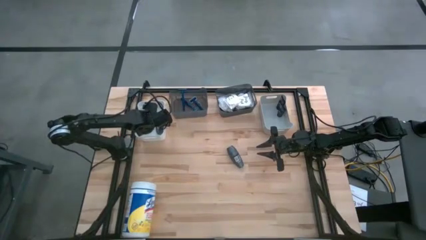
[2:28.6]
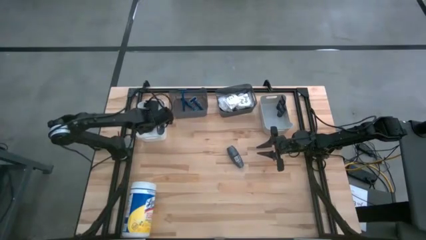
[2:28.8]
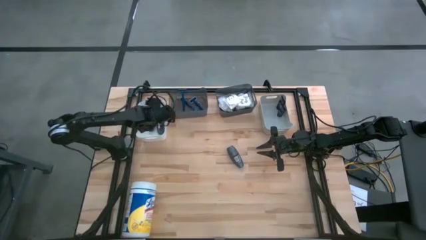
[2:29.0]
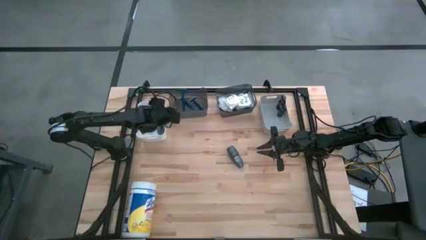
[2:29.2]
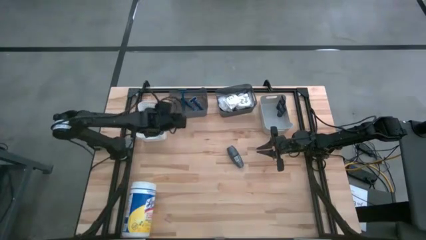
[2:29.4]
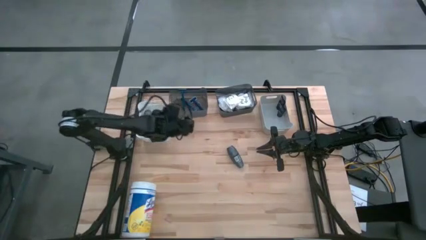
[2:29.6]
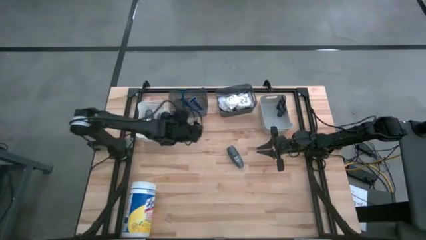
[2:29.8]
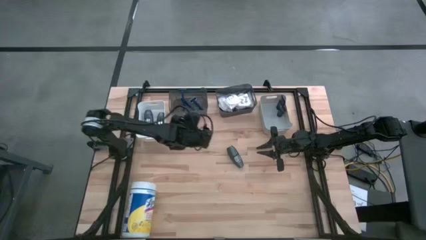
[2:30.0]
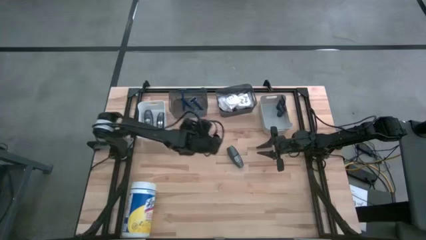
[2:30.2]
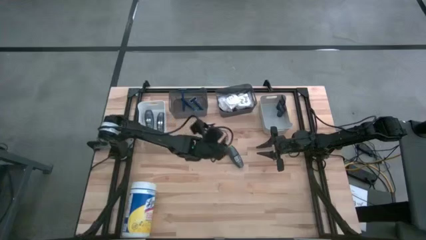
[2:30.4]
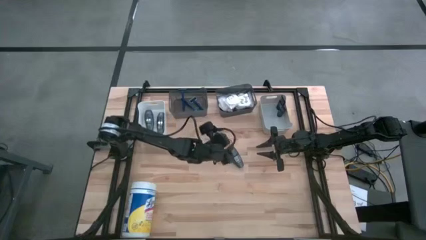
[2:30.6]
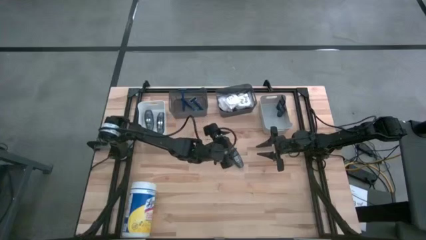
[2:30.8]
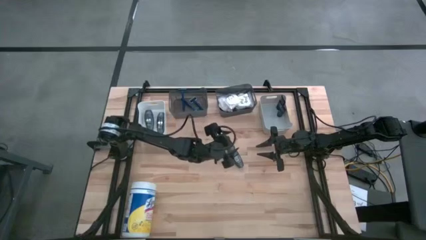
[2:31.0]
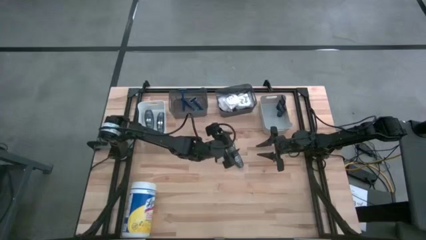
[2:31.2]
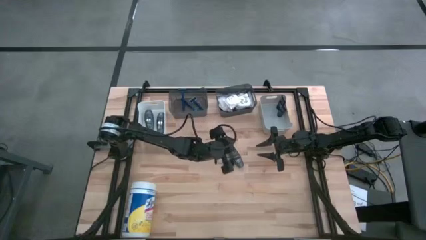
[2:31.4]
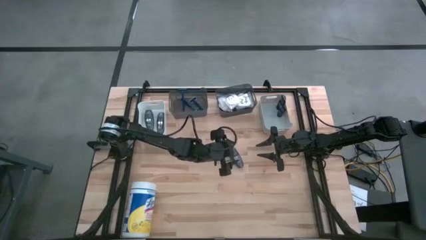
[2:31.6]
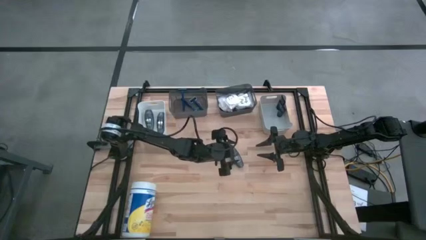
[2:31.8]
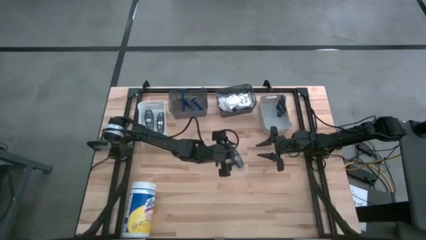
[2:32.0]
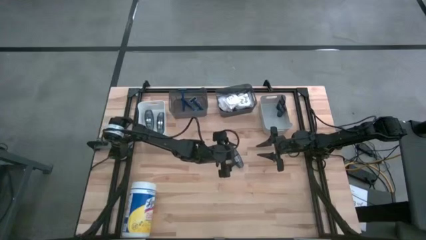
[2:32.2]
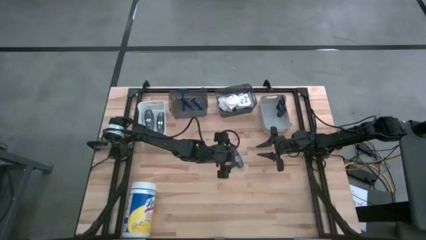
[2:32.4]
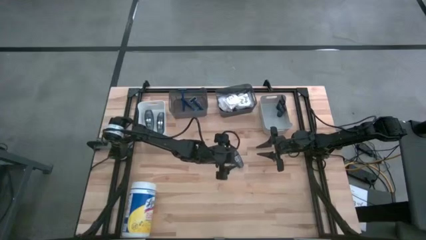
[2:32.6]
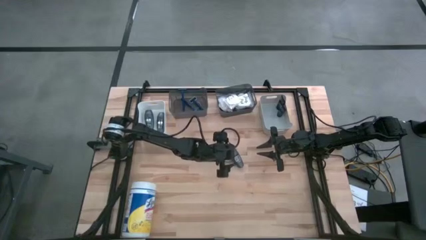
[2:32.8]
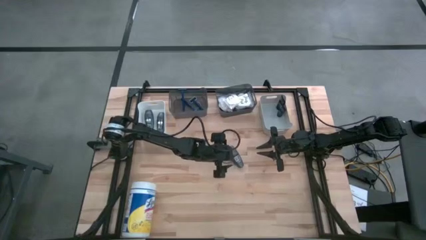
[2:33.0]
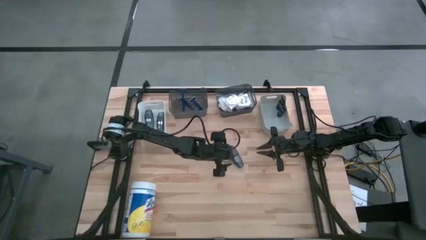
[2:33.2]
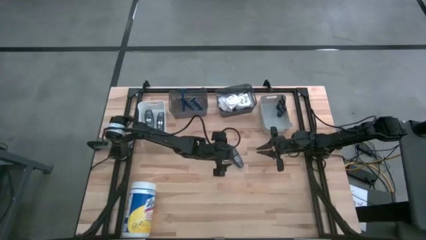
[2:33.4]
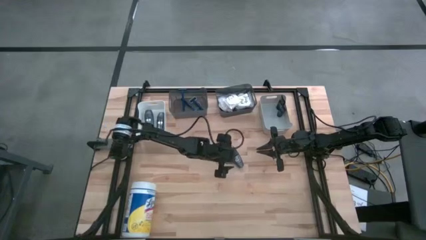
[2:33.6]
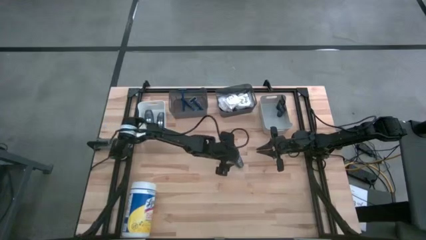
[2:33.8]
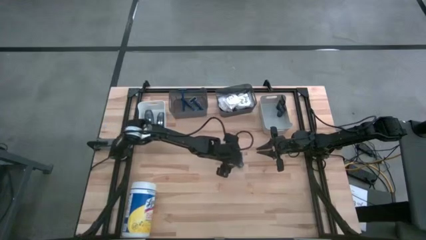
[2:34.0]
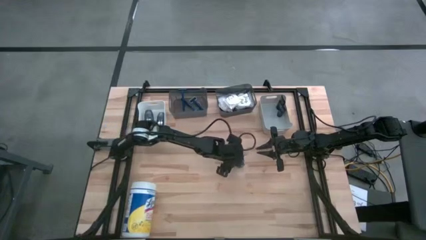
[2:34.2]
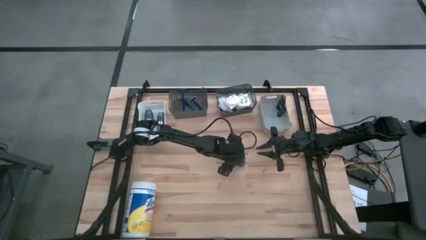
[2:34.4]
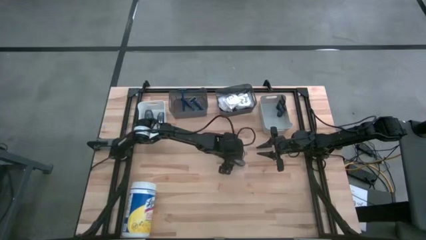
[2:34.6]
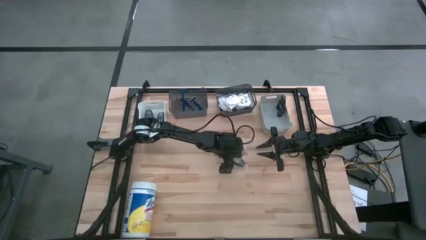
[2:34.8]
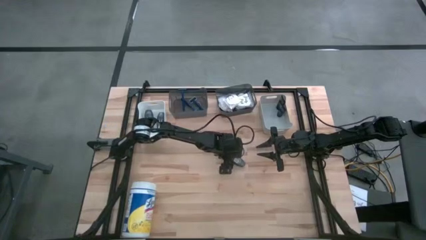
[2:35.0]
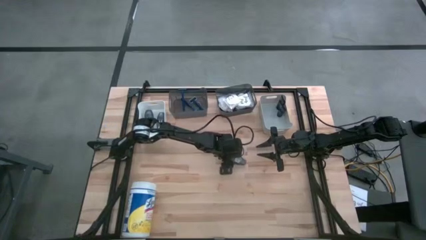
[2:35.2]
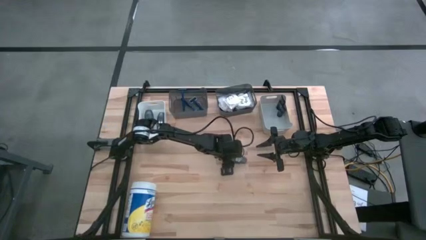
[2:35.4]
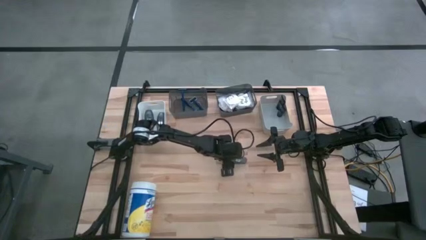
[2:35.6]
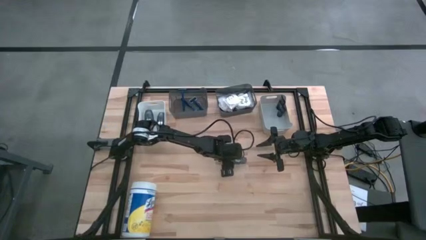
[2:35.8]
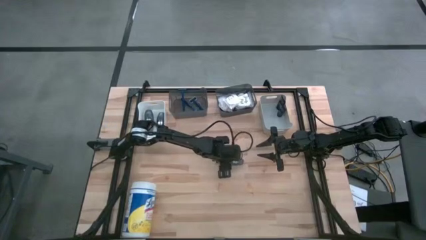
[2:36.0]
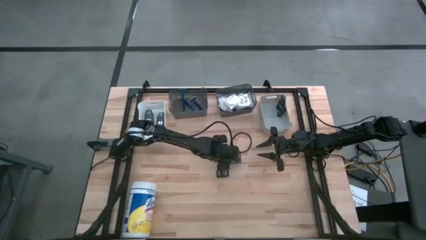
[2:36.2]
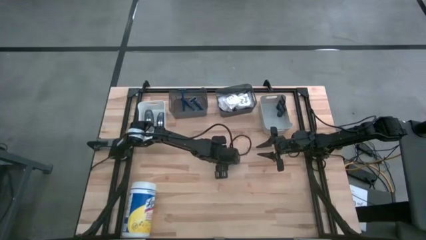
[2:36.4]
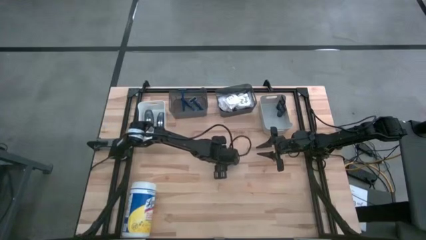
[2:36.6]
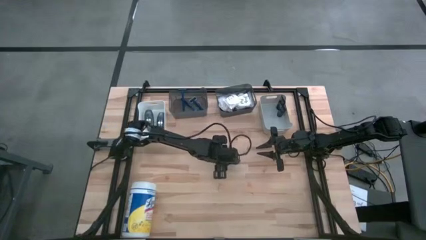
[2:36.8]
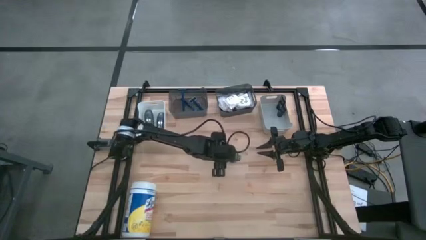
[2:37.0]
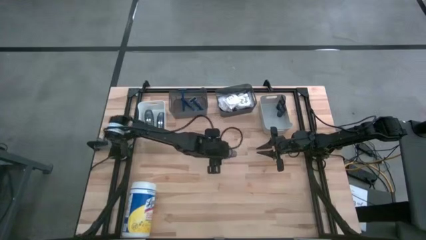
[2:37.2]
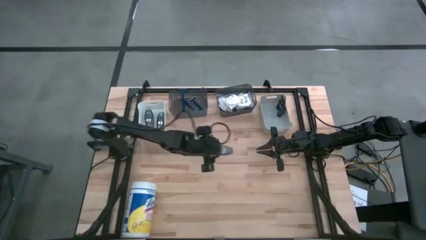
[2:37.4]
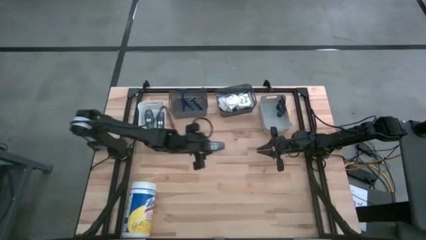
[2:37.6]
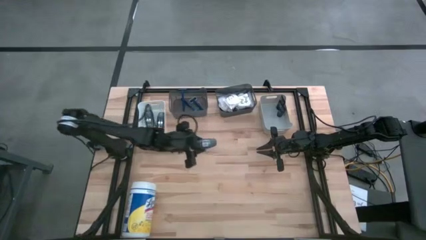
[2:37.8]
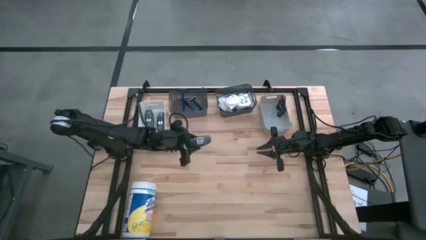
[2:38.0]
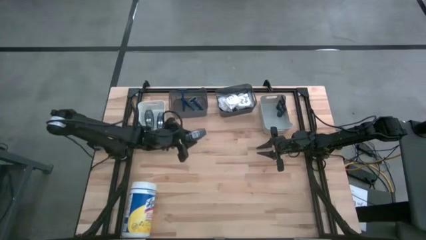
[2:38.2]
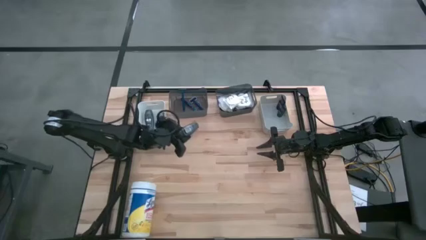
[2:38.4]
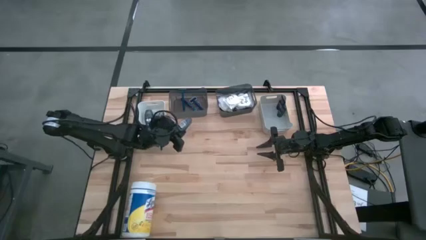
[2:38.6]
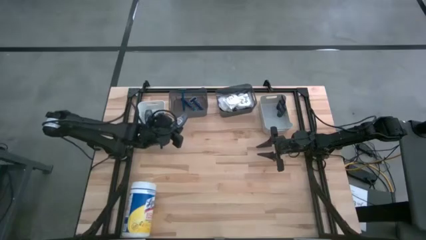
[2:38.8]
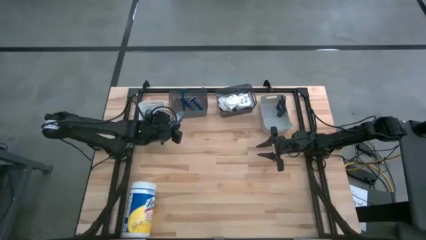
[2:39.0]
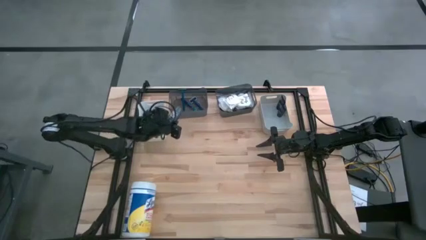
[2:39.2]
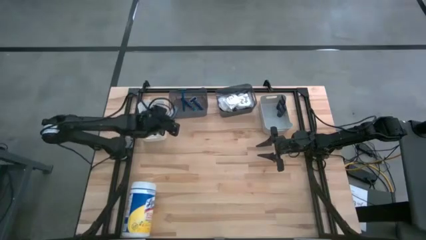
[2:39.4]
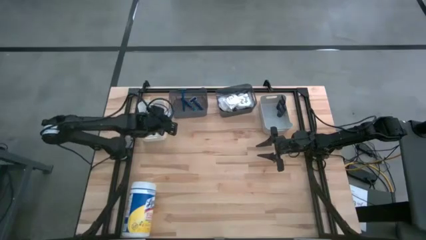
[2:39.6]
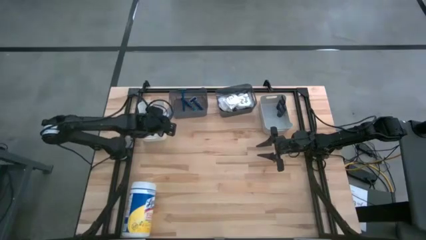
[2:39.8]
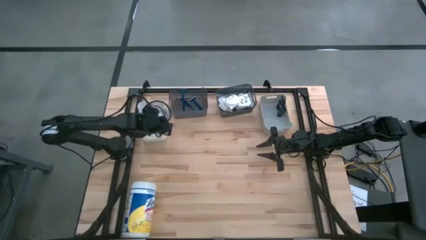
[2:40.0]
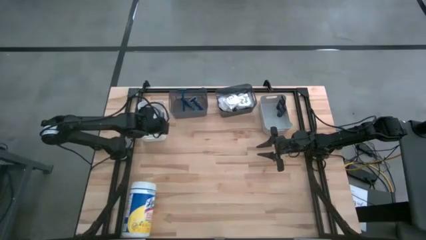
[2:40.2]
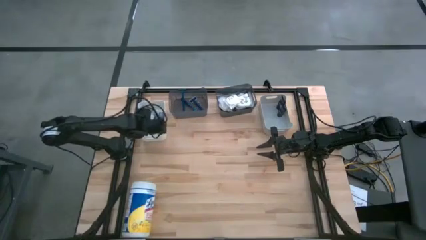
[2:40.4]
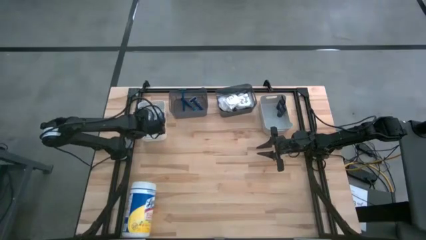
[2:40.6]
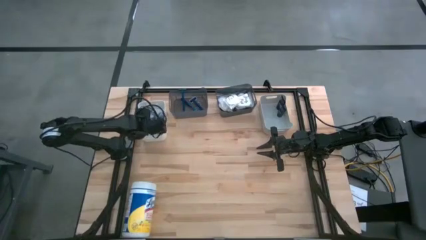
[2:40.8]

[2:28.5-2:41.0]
Task: Pick & Place Travel size toiletries
Put the black deodorant into the white bin

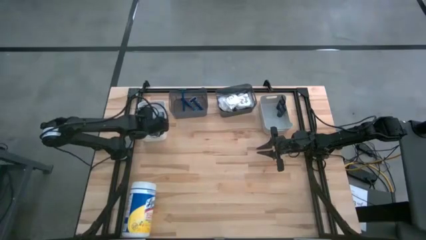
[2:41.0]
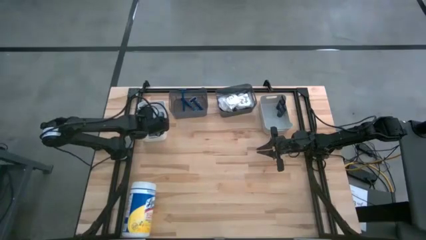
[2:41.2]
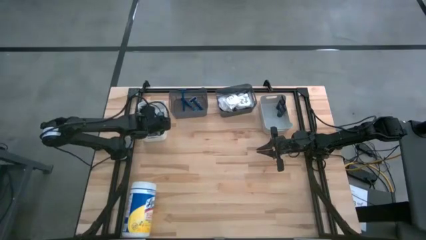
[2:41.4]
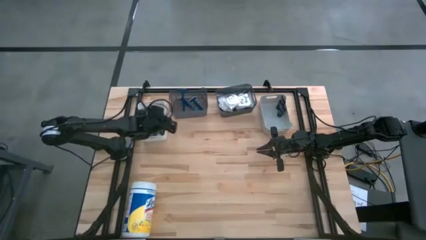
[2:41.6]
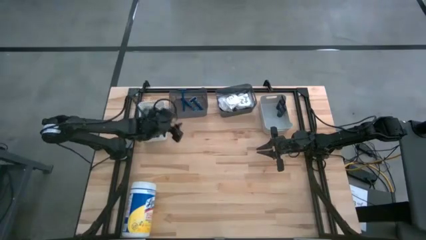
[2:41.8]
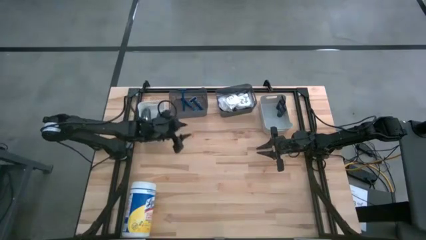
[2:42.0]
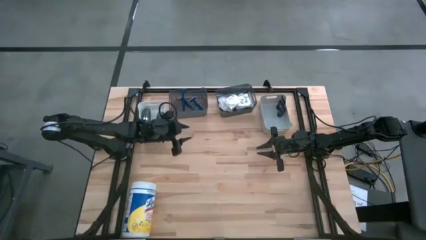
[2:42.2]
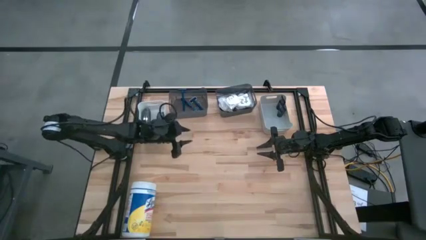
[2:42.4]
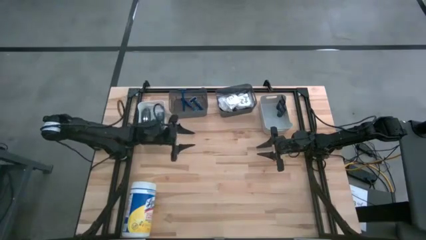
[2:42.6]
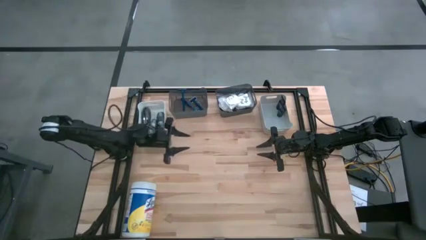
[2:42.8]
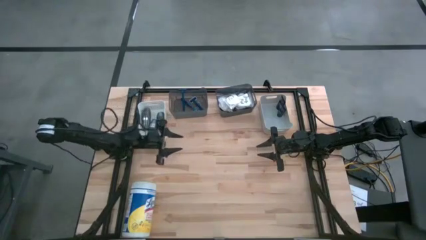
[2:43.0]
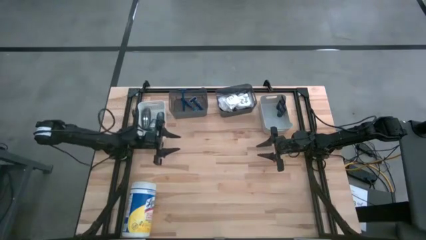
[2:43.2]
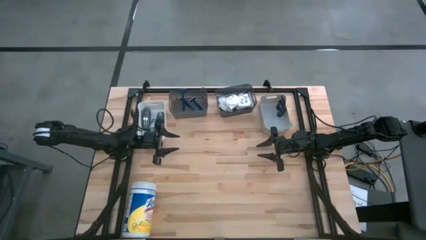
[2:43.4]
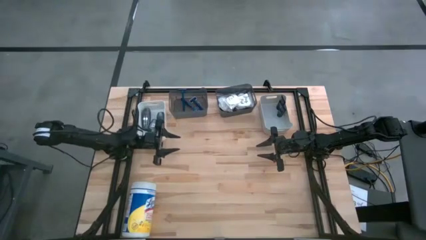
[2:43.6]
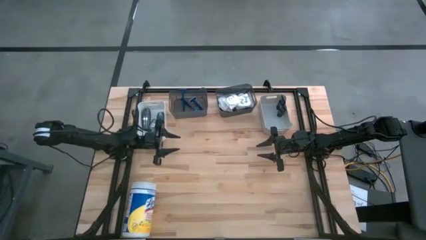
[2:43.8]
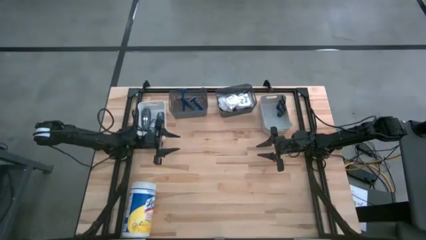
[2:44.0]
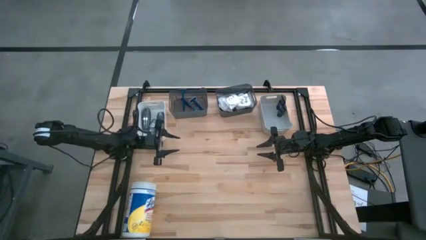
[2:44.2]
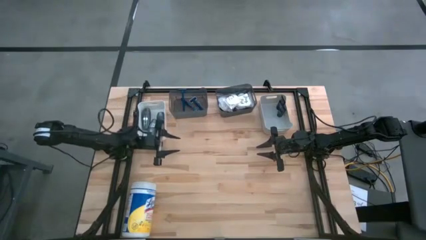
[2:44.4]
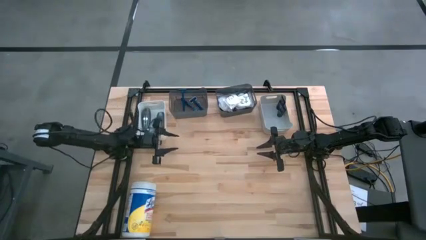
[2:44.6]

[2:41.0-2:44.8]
Return to Home Position
